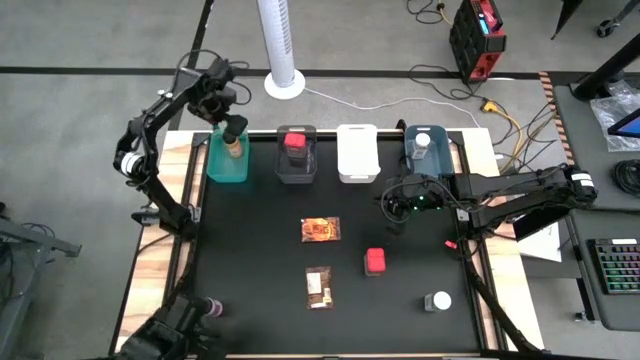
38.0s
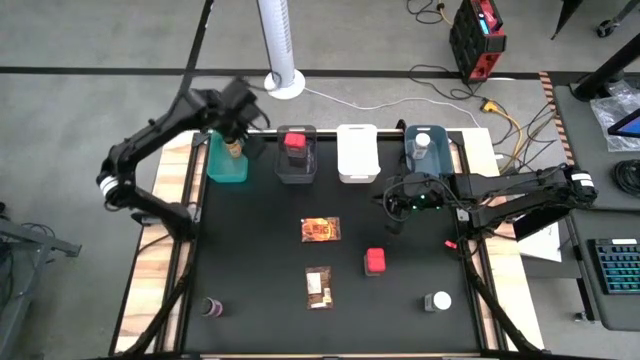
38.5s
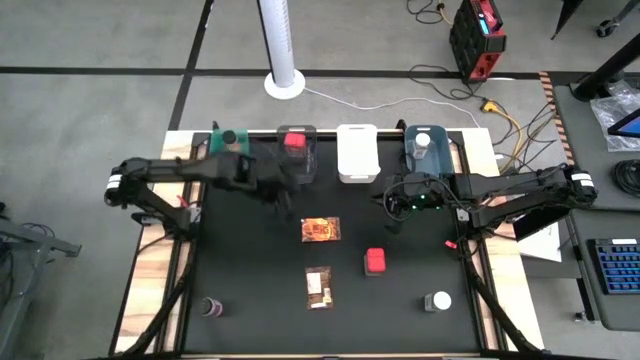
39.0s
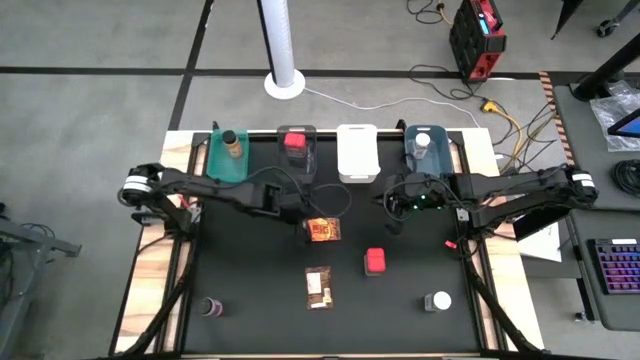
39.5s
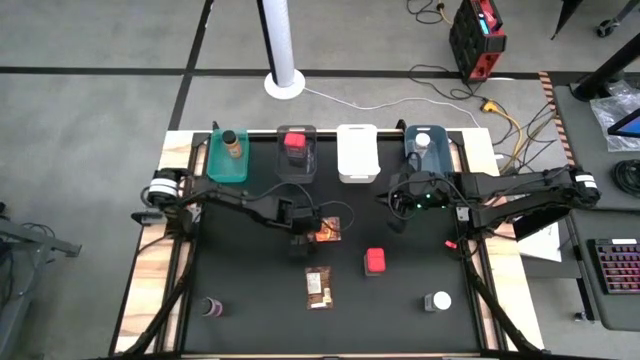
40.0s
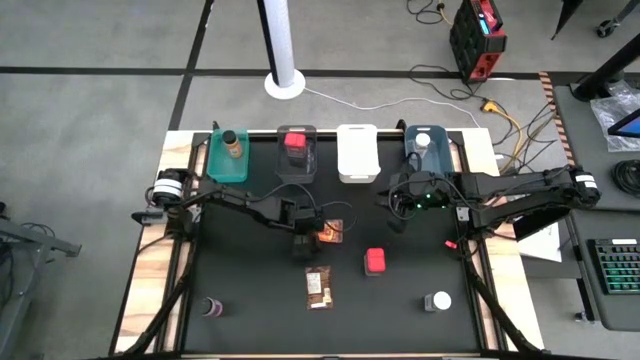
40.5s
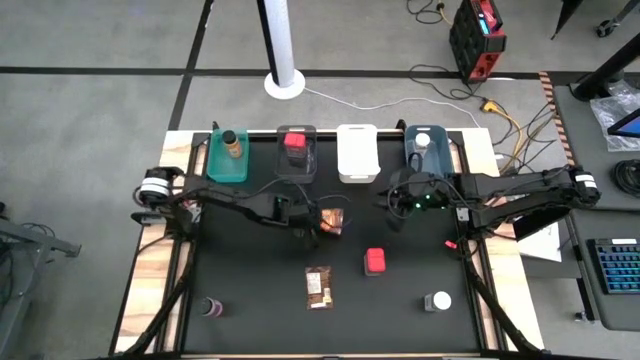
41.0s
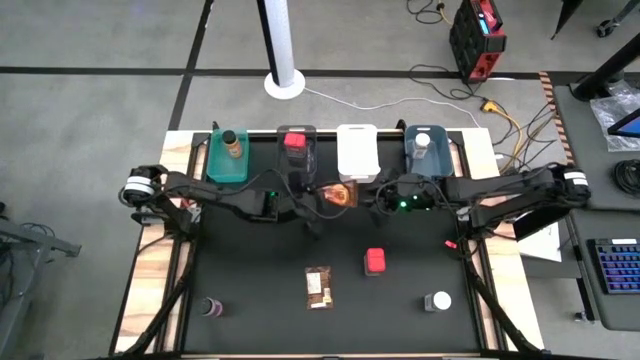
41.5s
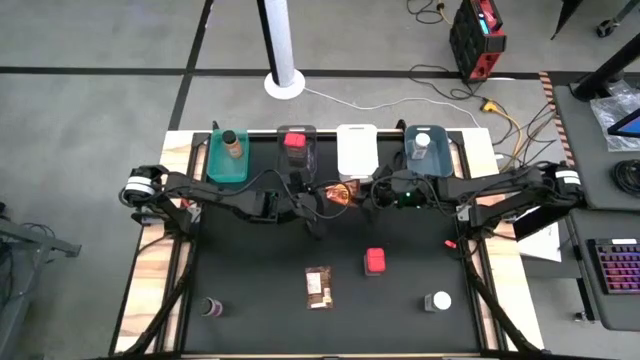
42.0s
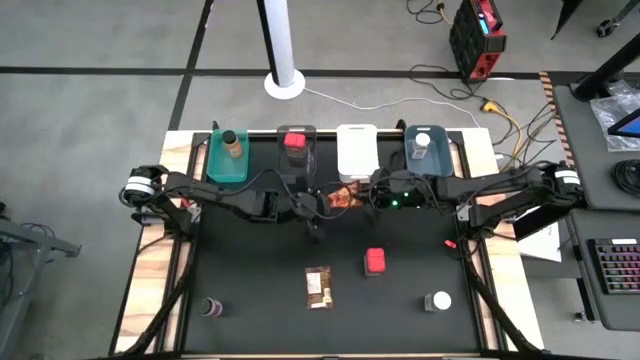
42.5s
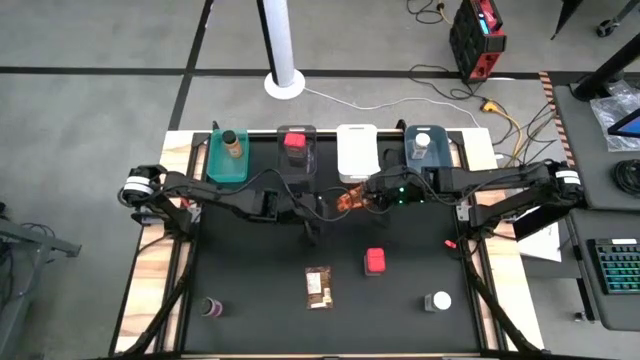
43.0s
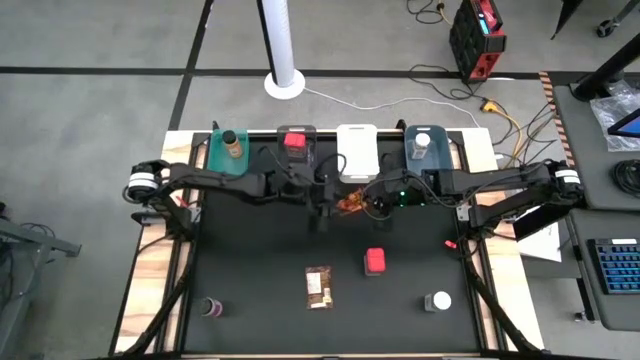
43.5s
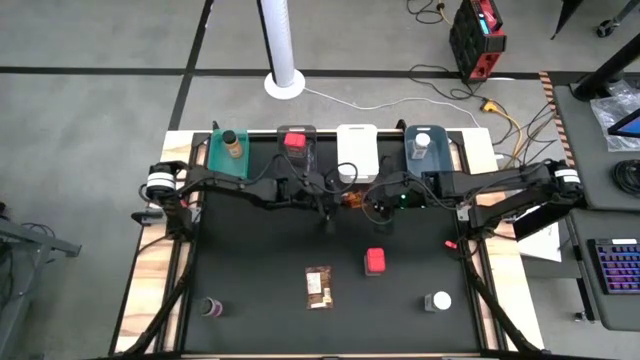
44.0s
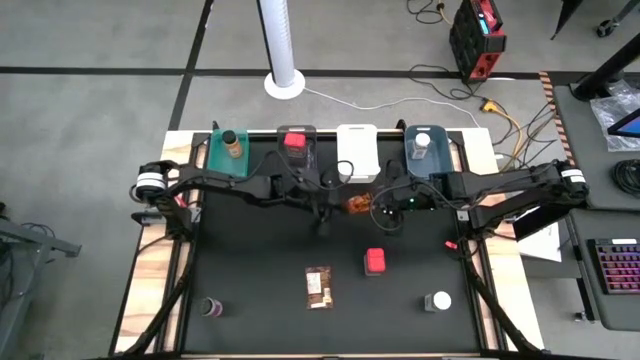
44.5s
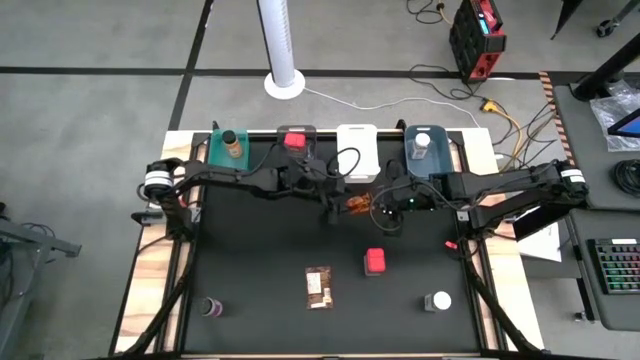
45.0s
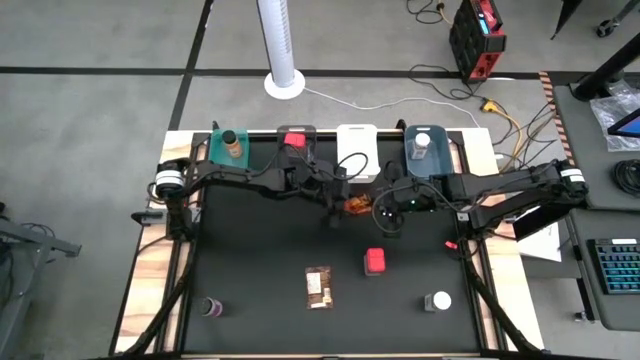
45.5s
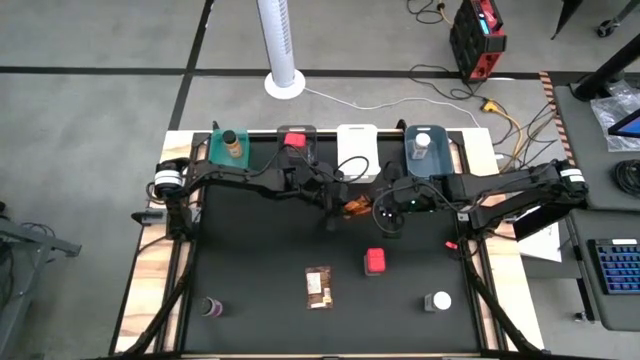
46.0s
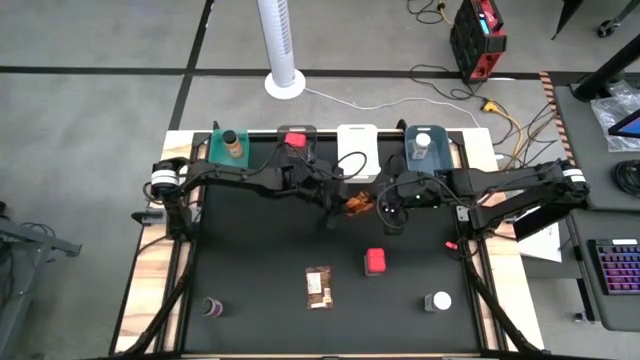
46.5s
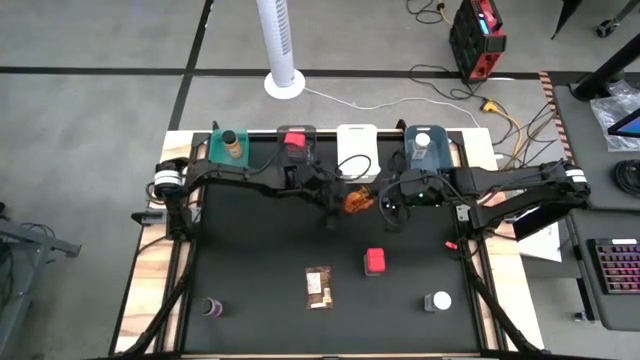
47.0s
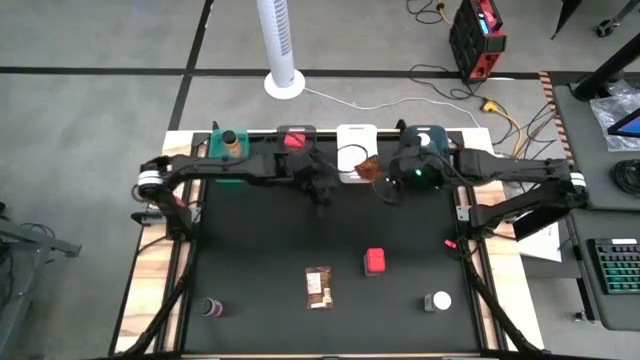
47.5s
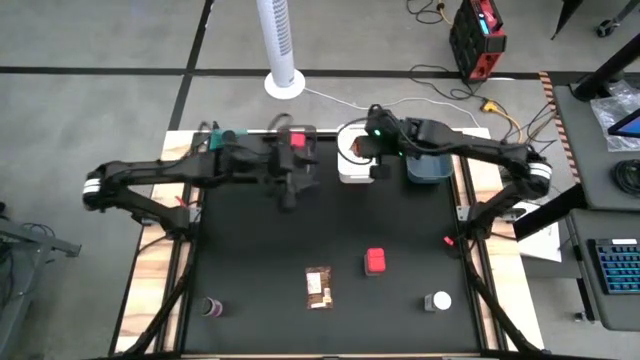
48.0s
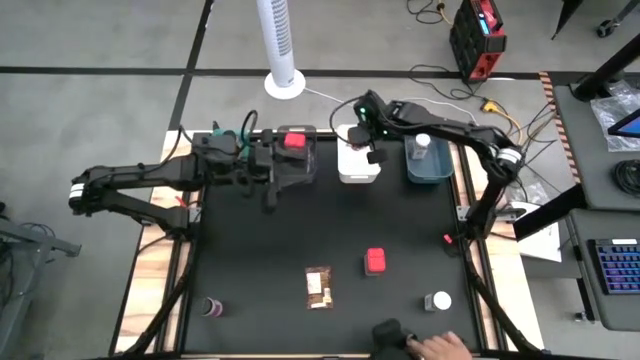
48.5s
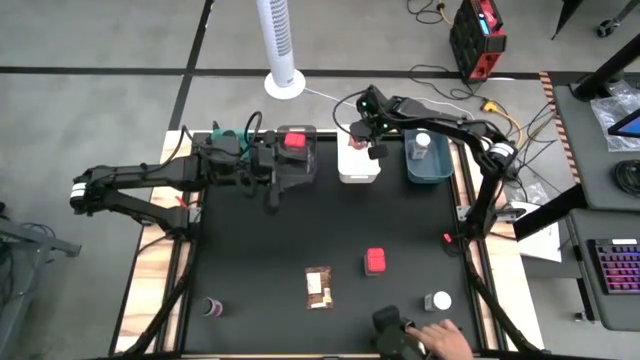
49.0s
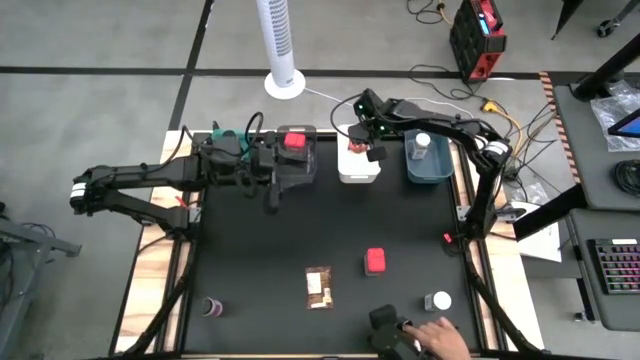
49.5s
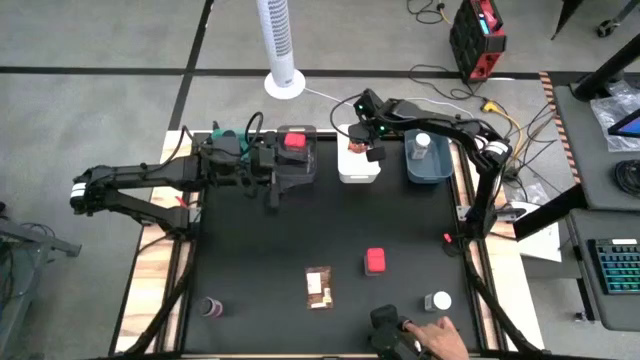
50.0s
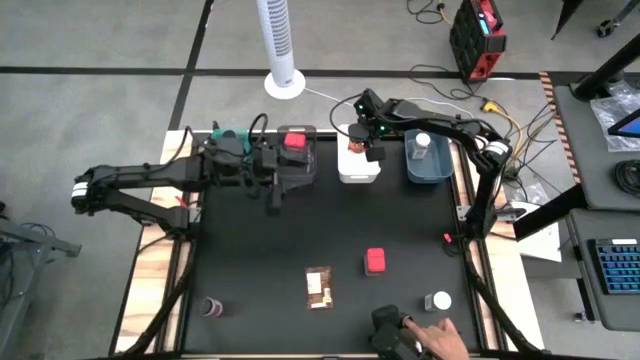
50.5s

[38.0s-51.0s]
Task: Sort spices by type
Put the top orange seasoning pack into the white bin

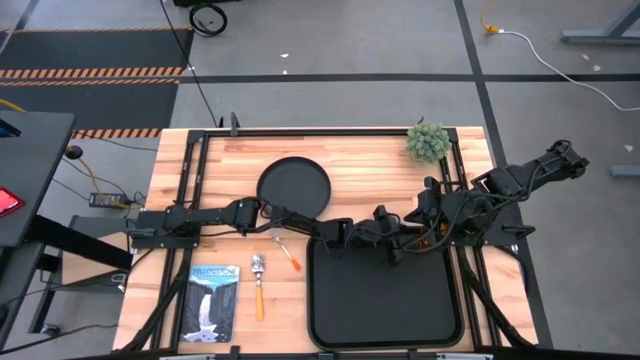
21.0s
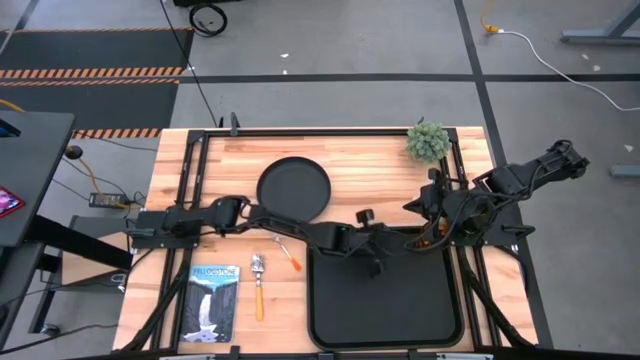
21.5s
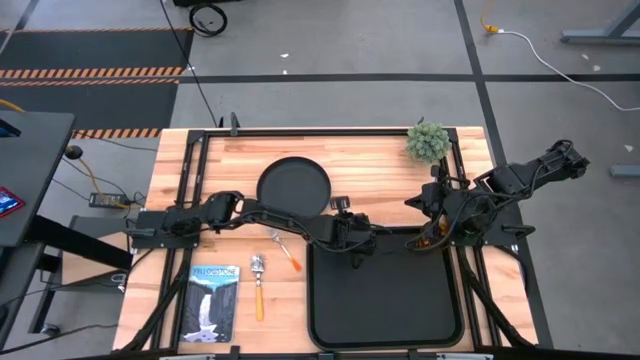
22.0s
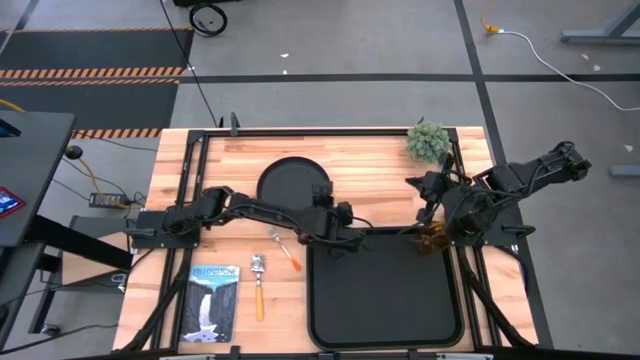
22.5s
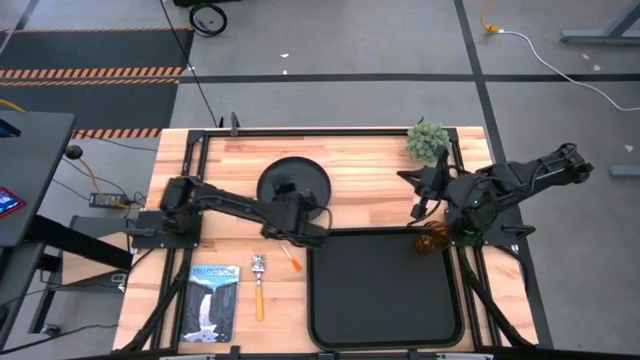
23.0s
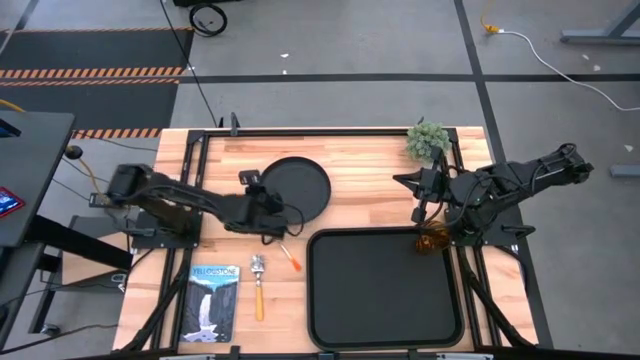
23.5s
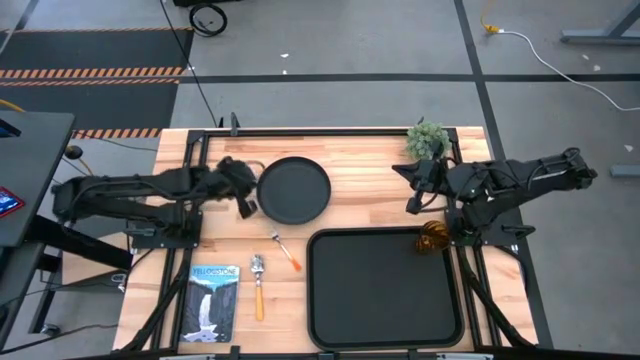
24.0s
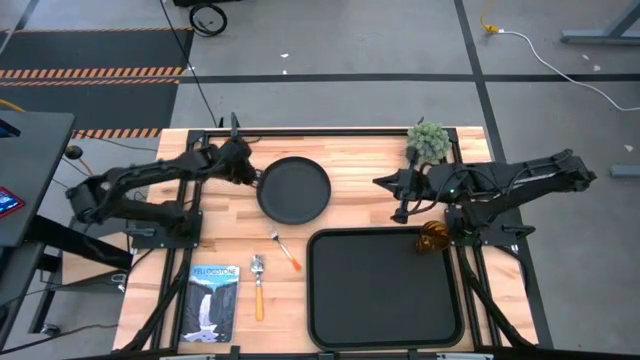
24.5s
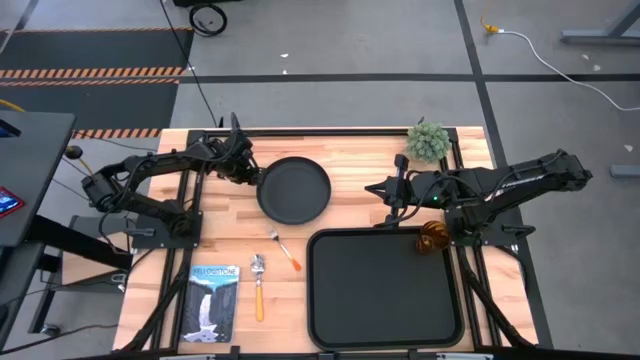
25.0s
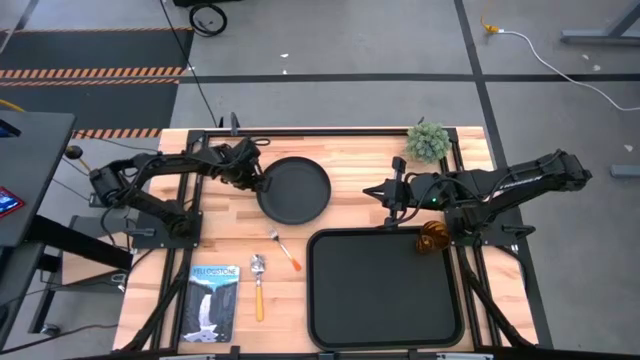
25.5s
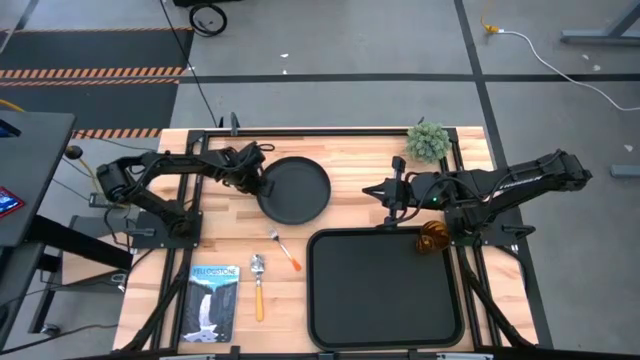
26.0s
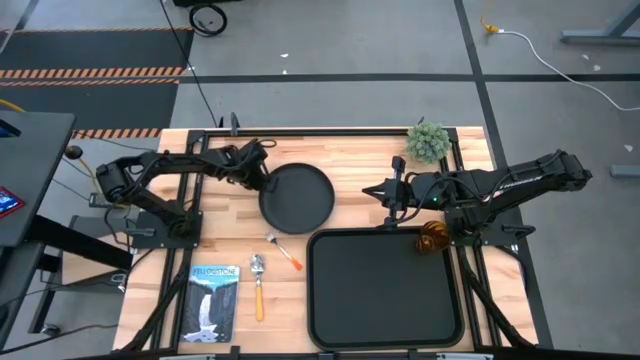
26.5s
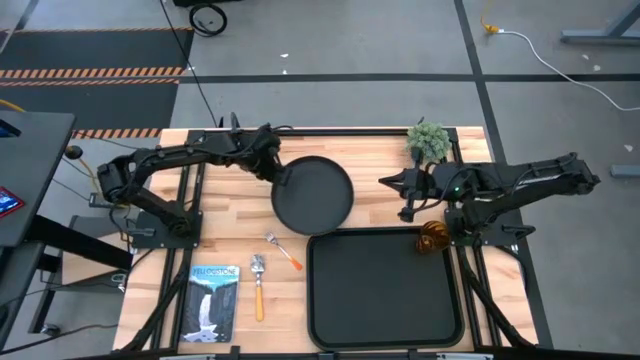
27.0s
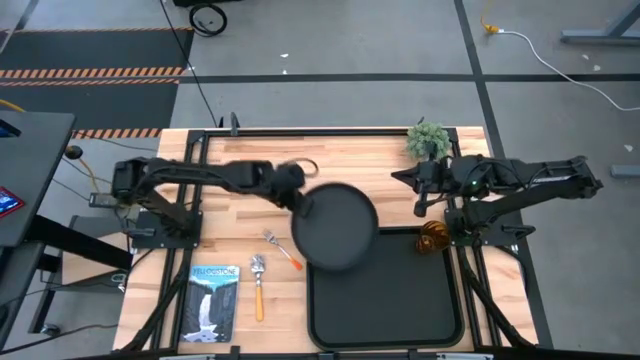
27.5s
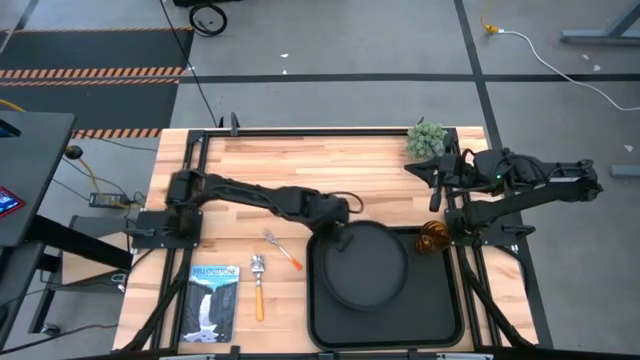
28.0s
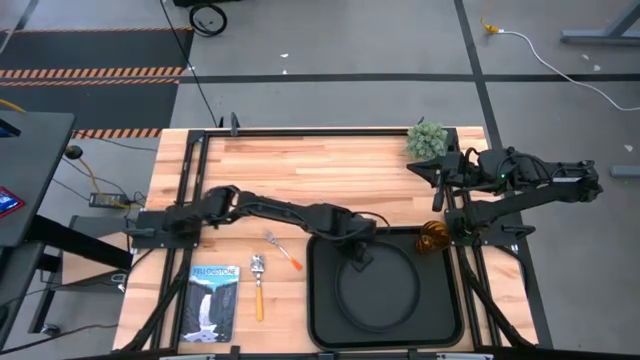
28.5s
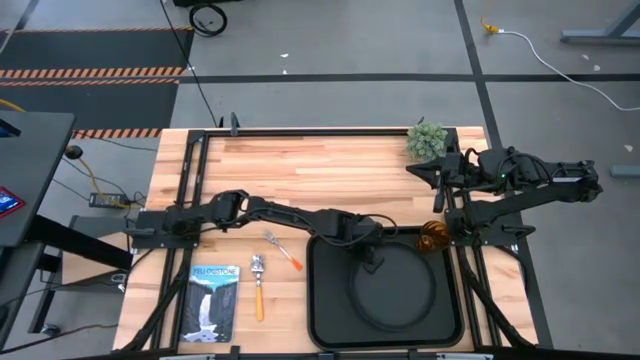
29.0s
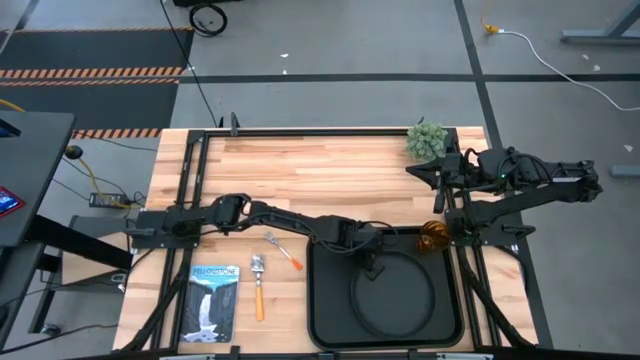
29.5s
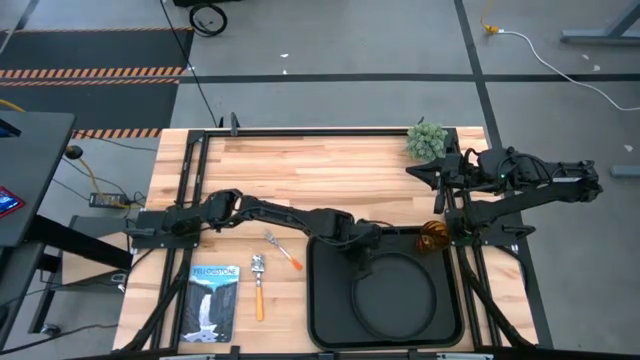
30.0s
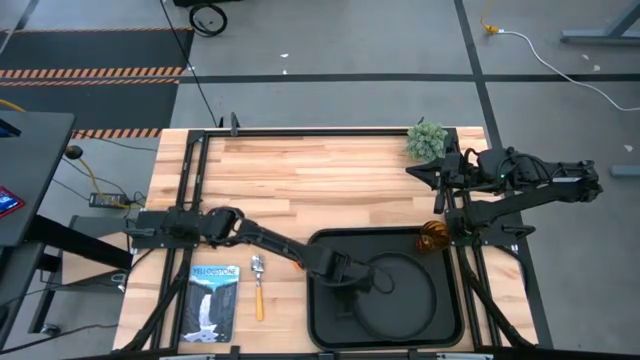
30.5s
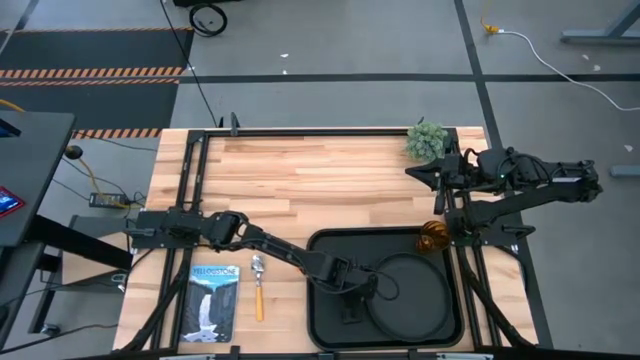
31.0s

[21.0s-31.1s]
Task: Pick and place plate/cup/fork/spoon on tray
Put the black plate on the black serving tray to the bottom of the orange cup
